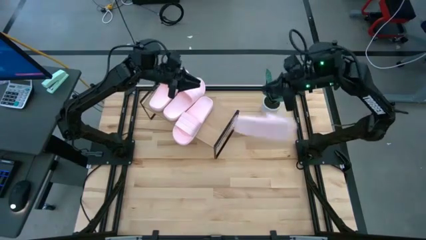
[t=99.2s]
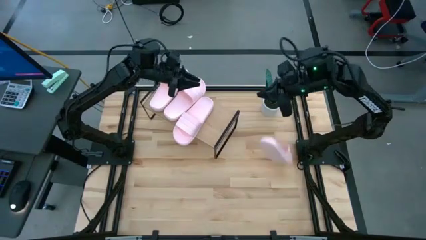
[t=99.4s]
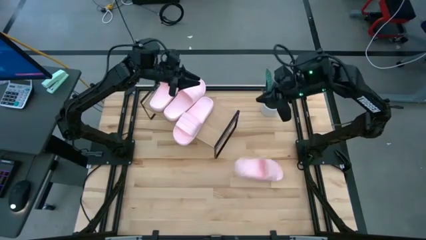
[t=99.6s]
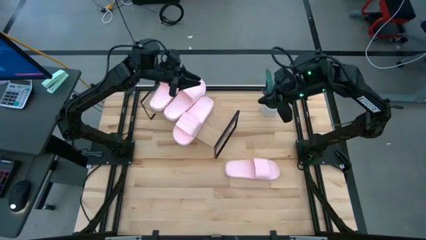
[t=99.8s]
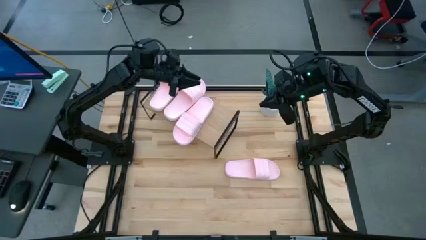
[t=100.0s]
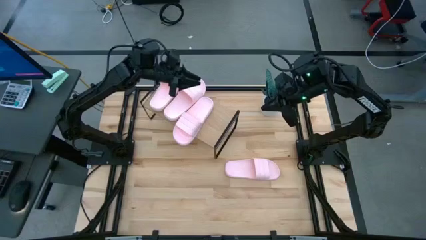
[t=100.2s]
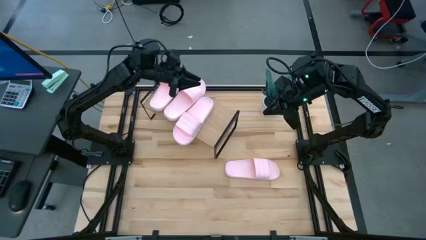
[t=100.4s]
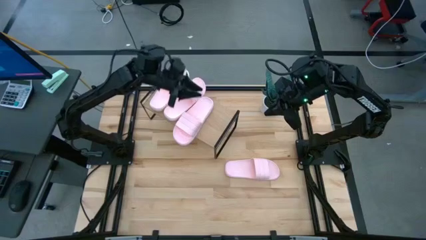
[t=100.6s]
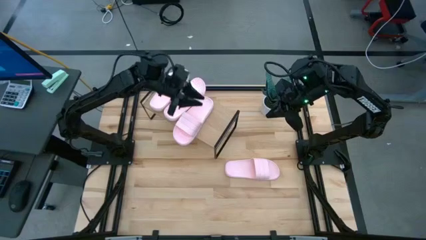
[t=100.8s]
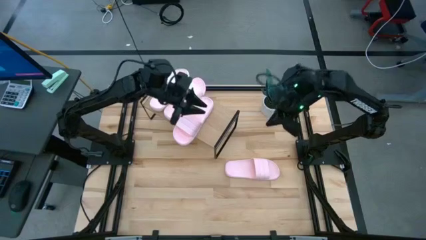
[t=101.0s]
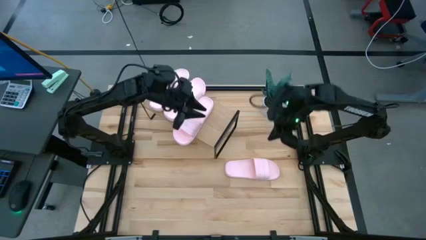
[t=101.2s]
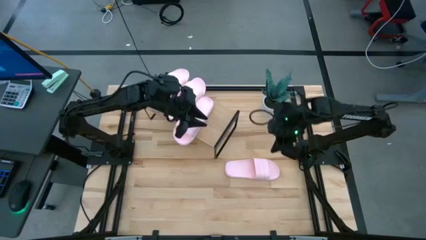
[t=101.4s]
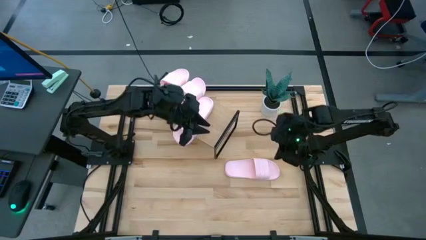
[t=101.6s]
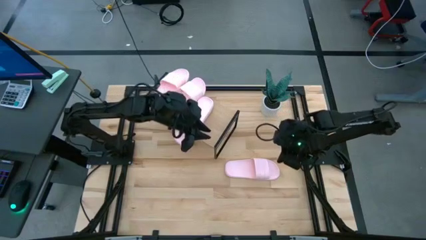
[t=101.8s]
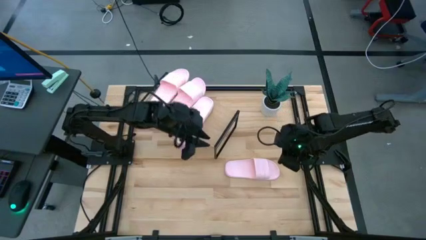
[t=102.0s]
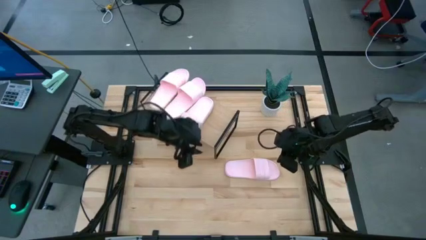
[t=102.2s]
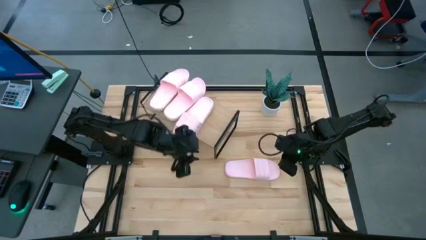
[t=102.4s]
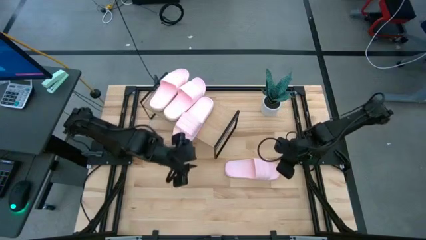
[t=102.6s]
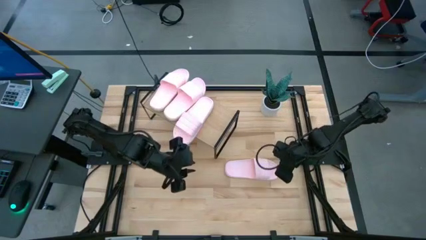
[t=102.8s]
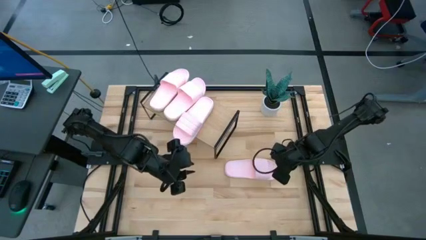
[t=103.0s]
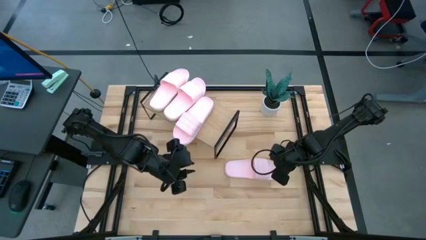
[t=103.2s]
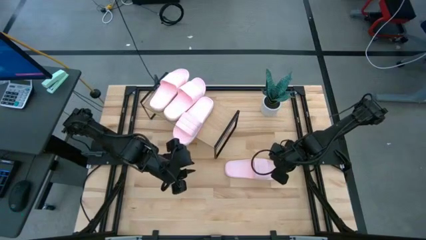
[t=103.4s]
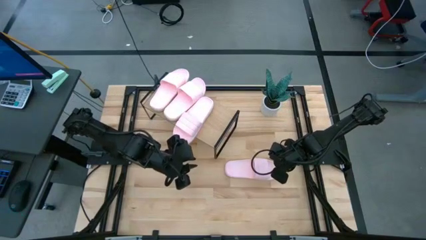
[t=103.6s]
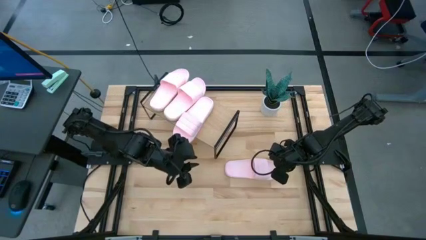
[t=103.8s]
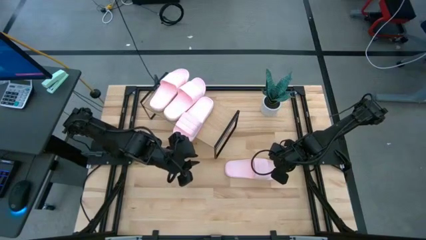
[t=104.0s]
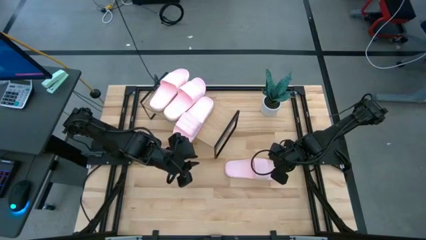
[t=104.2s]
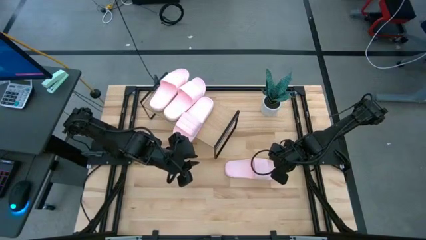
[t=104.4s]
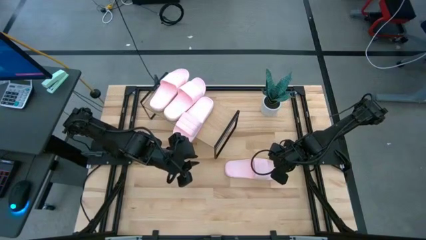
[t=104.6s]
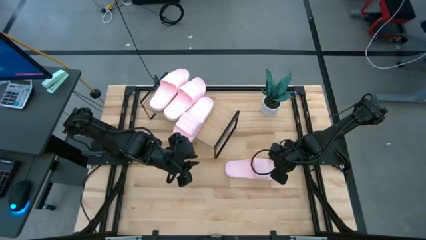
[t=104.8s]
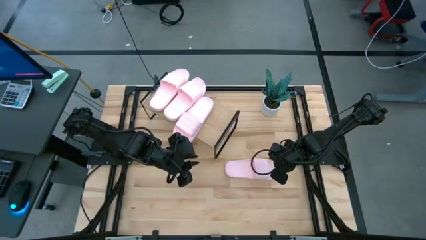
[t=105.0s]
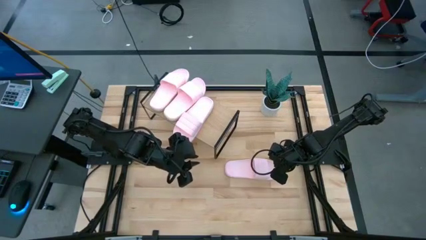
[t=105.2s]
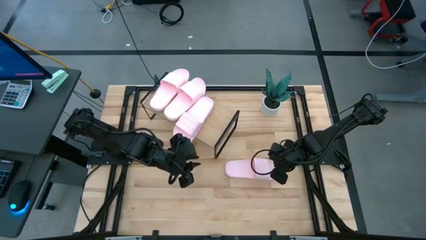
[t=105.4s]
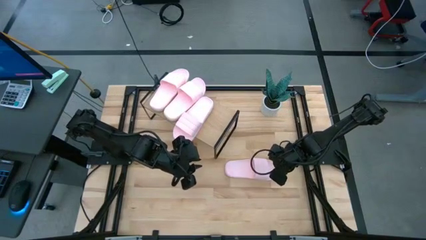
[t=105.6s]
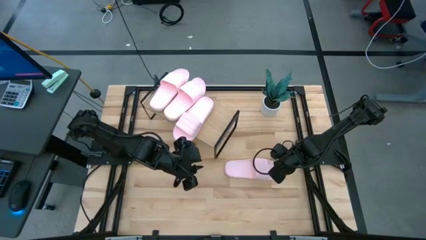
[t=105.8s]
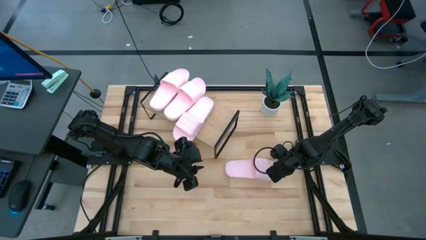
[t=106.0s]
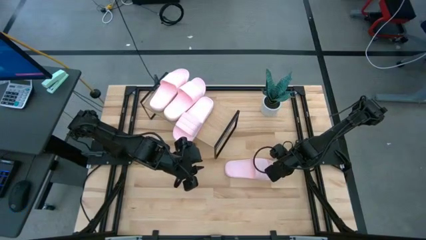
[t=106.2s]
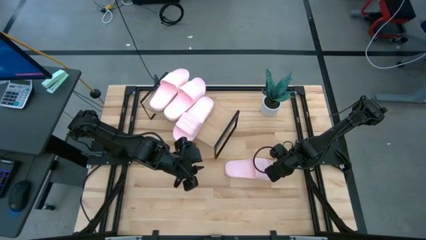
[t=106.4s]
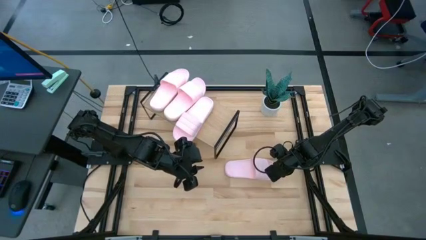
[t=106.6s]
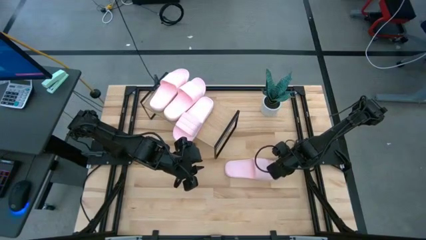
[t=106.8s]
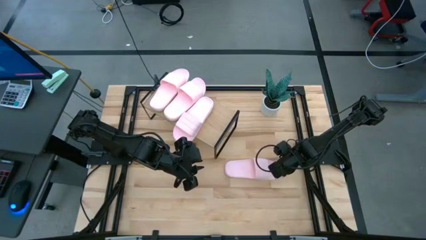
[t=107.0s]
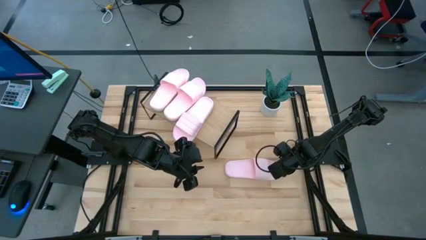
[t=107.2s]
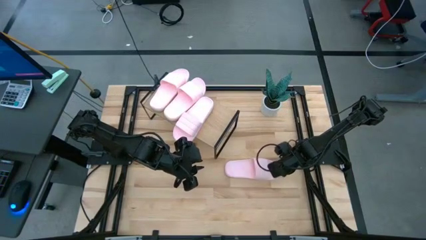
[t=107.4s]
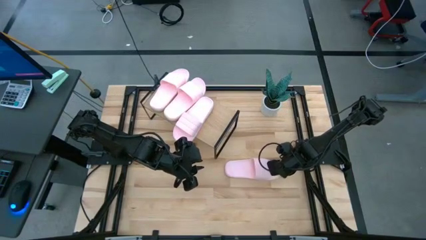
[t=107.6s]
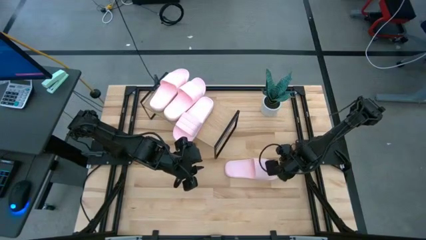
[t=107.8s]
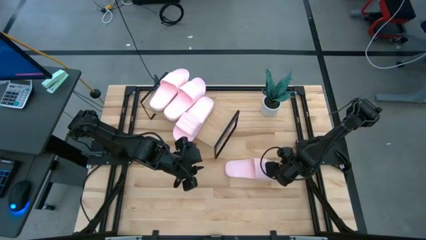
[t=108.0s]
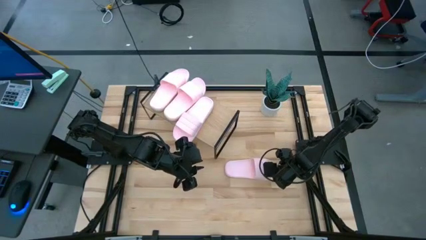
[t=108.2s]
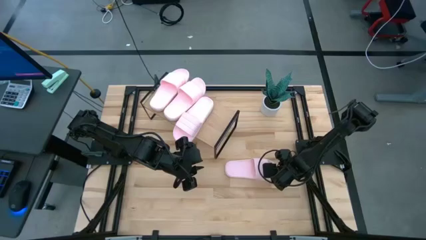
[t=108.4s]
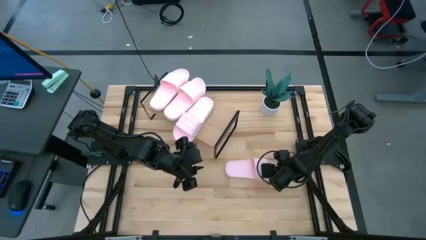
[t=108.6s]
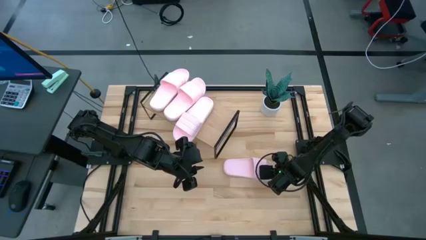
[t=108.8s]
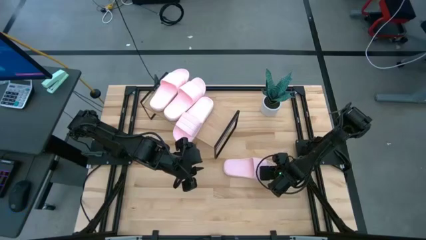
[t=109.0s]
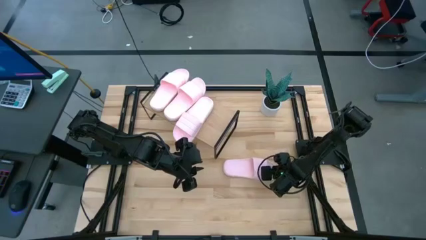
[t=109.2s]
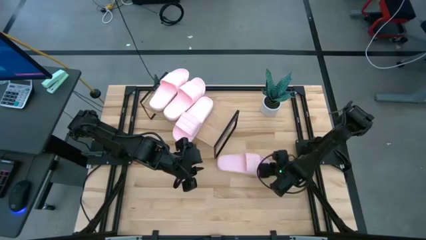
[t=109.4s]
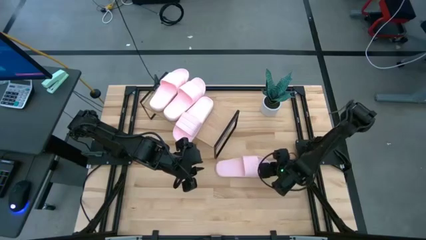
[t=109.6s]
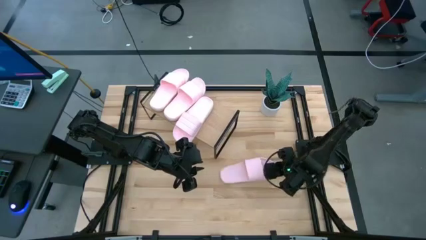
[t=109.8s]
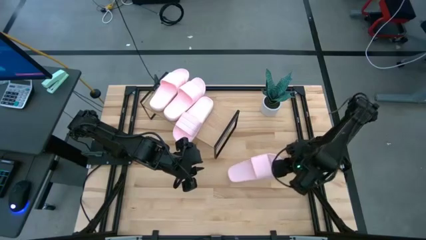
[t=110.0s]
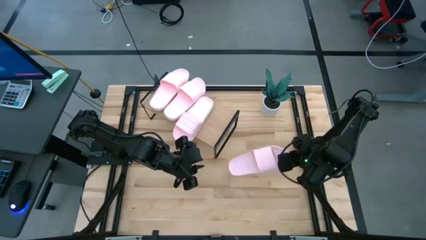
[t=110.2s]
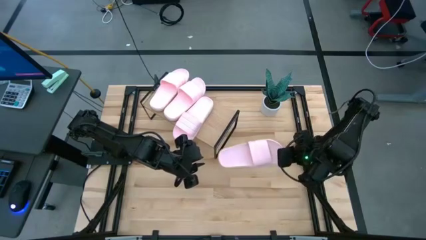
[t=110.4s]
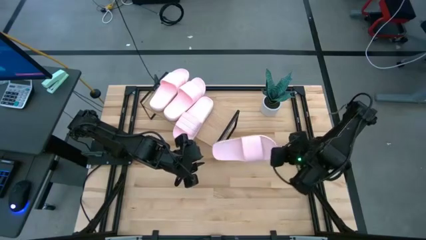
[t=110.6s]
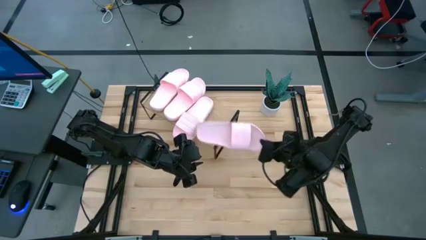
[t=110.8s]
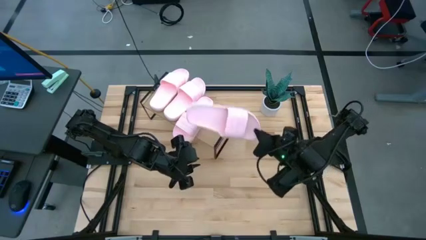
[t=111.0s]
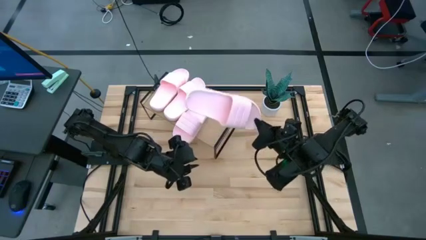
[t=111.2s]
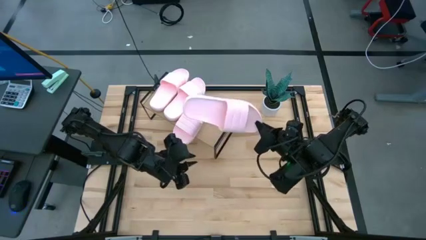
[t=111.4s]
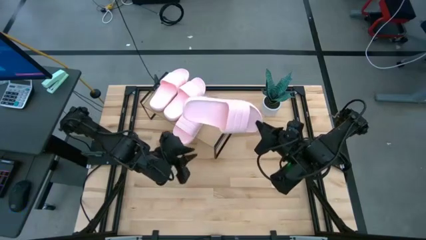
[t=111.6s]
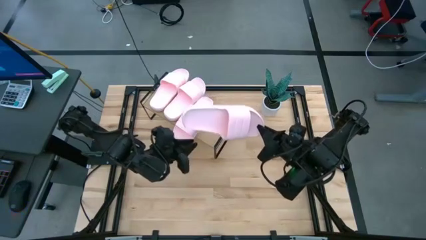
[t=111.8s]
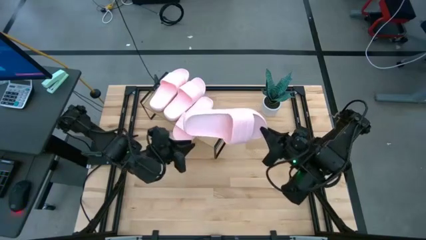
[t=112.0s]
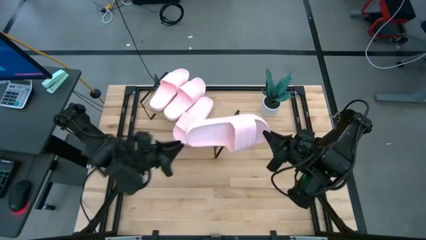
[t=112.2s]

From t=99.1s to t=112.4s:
Task: Pick and place slides into the shelf
Put the pink slipper on the shelf
